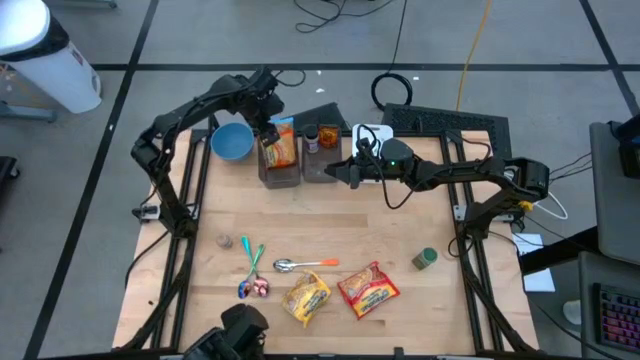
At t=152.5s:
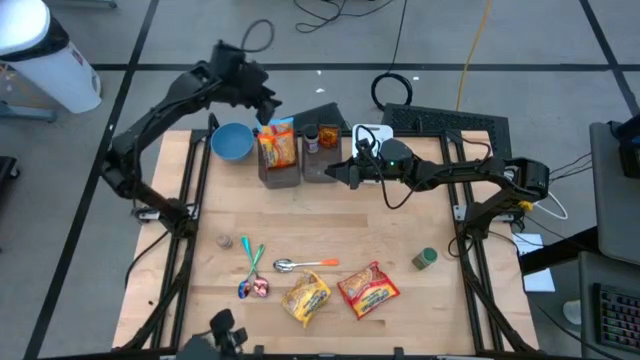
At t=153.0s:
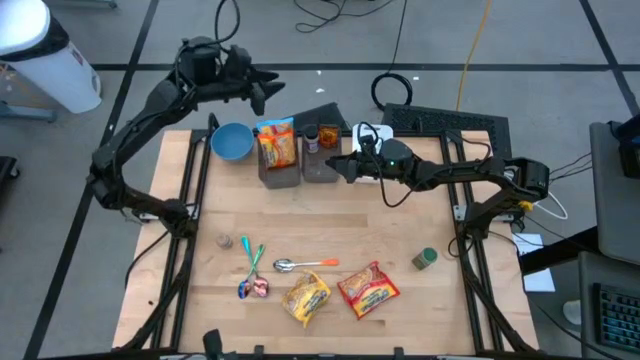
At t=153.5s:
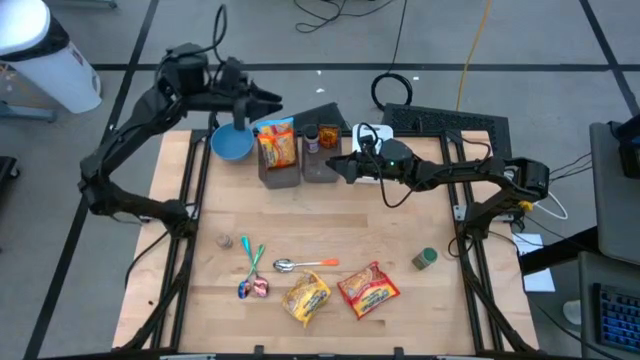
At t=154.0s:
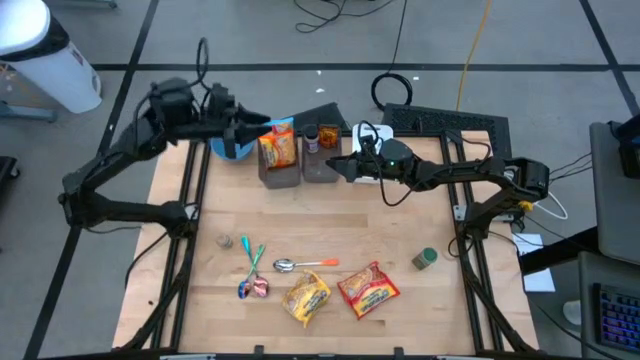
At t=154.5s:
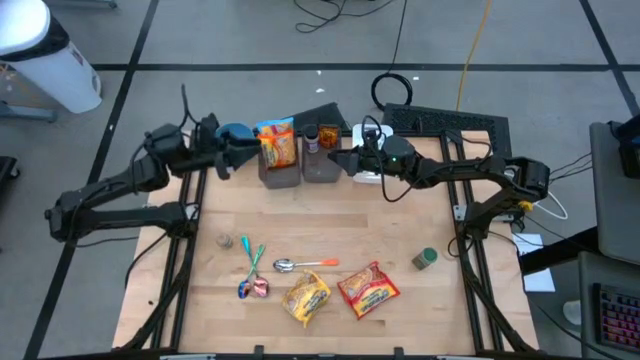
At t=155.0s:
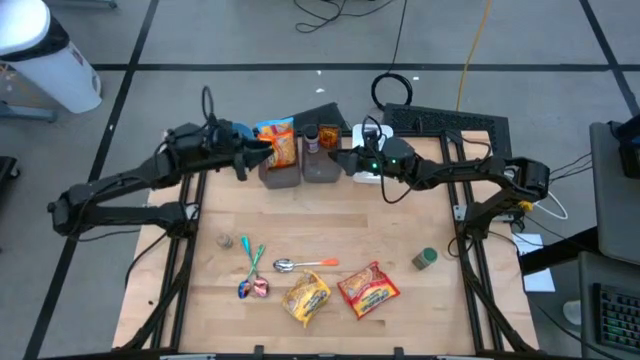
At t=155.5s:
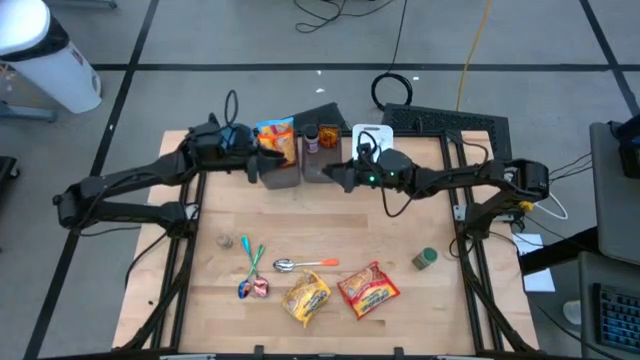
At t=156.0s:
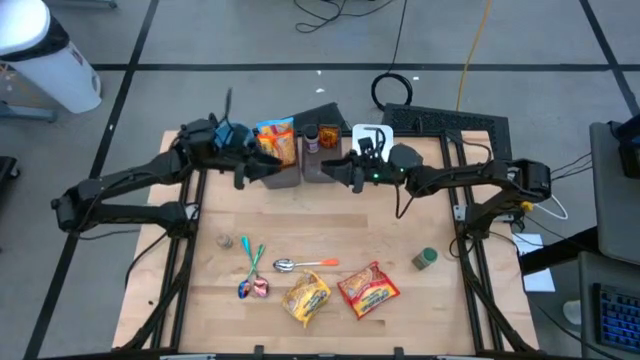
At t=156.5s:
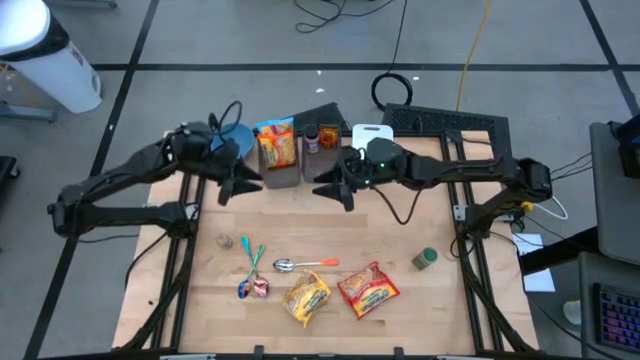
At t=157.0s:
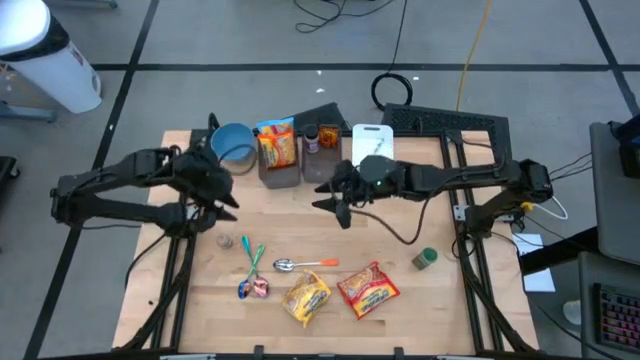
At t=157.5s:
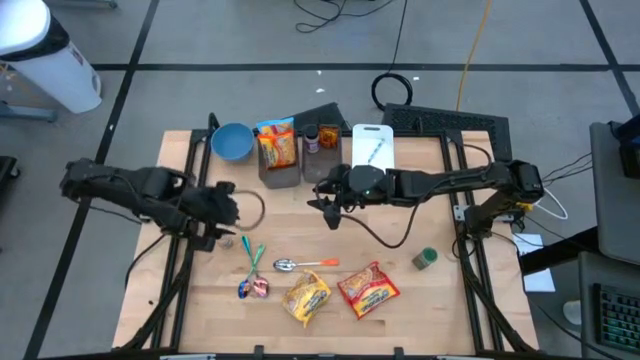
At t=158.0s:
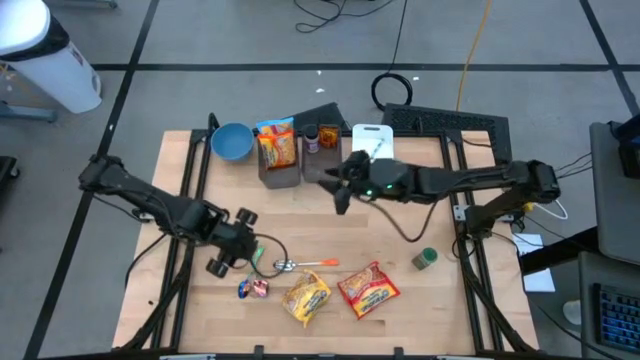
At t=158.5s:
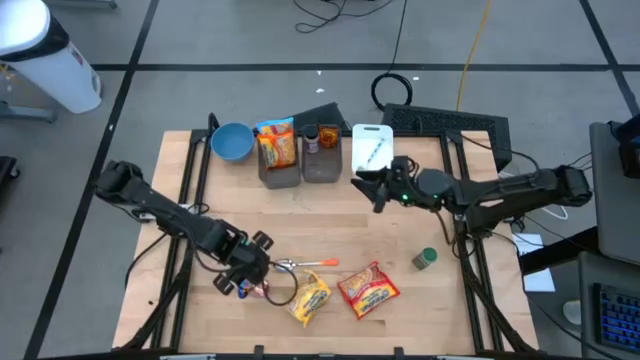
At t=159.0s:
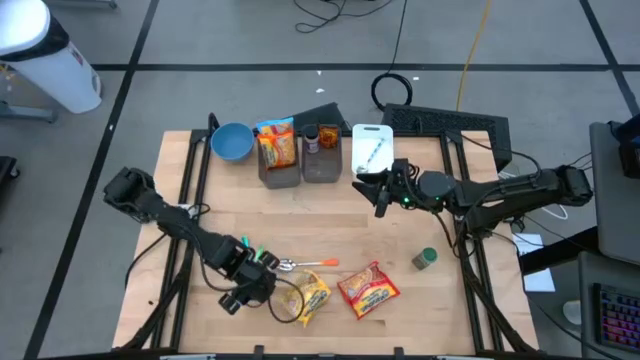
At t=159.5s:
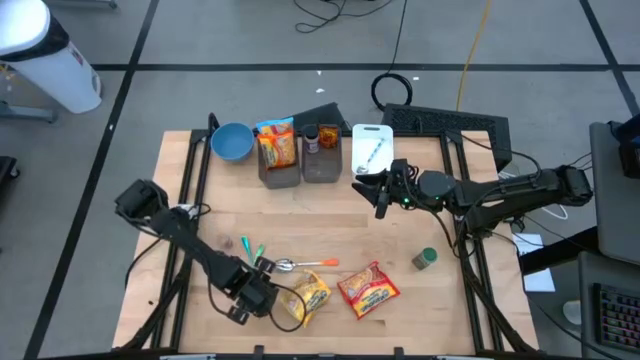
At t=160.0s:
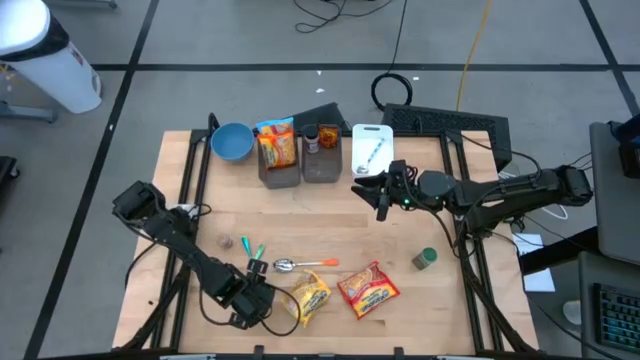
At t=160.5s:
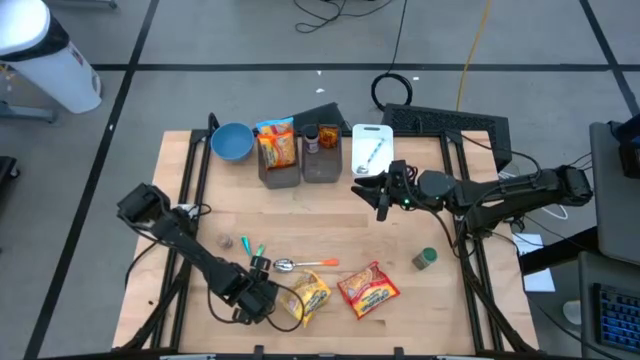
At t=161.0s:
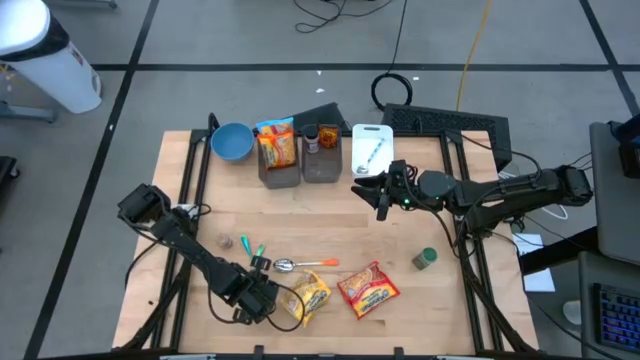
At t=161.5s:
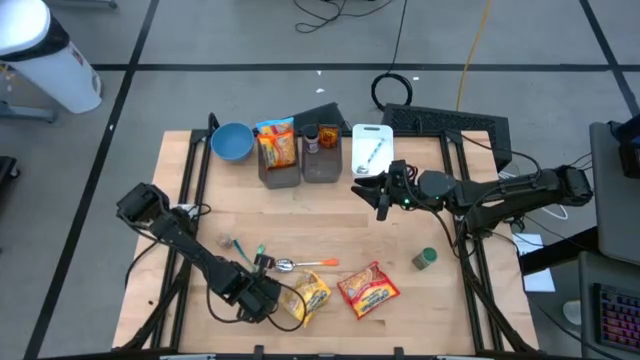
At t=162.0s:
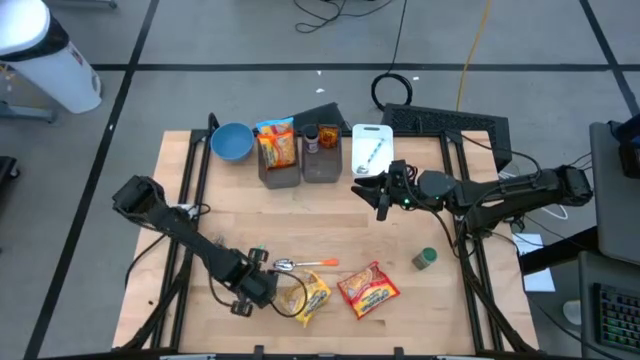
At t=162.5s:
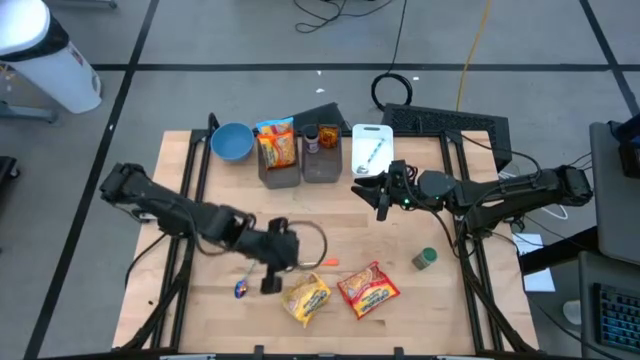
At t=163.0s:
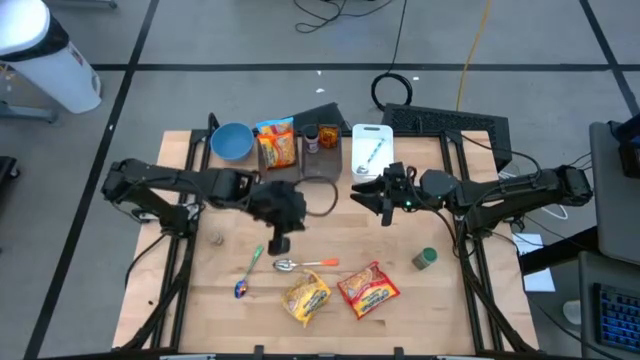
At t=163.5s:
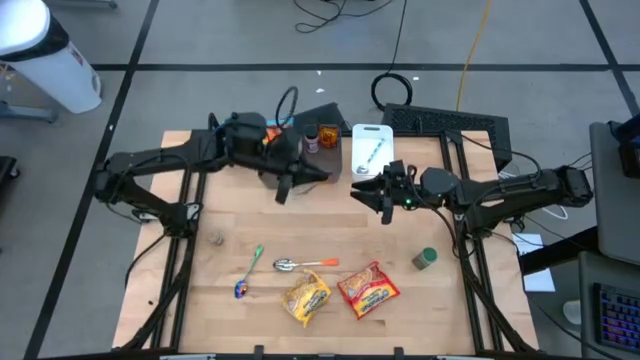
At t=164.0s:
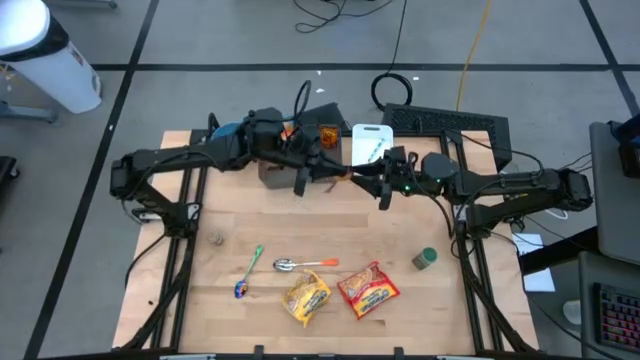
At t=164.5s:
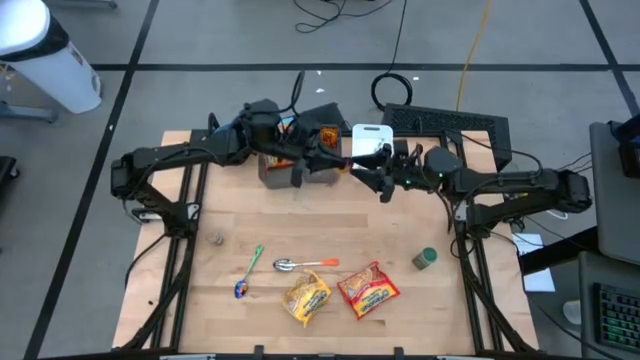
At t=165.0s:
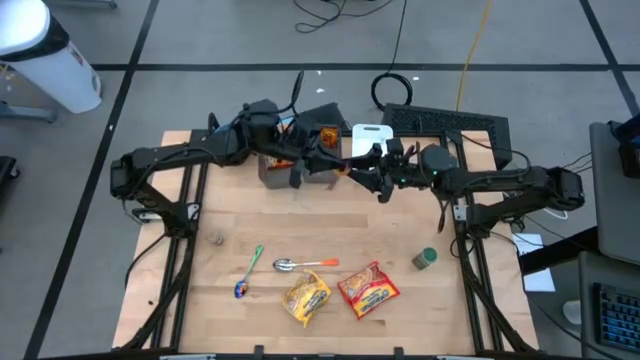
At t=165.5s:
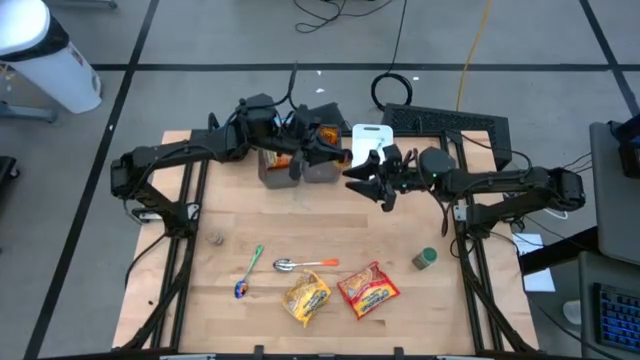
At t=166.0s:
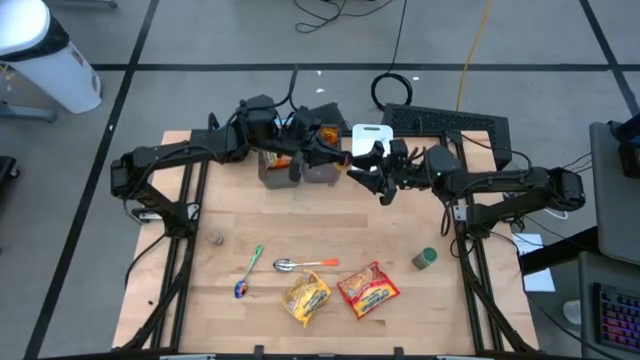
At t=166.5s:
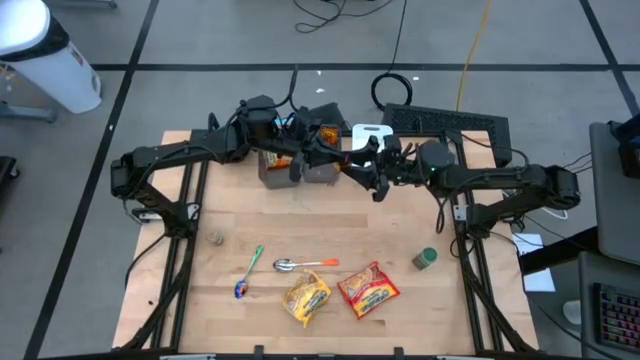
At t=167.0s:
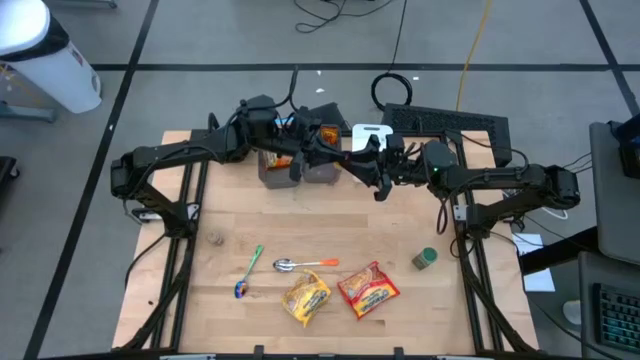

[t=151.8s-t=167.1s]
Task: Pick & Place Food Item
Put the right blue green spoon into the white bin

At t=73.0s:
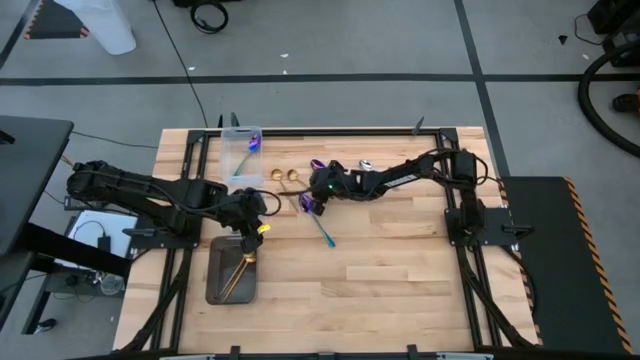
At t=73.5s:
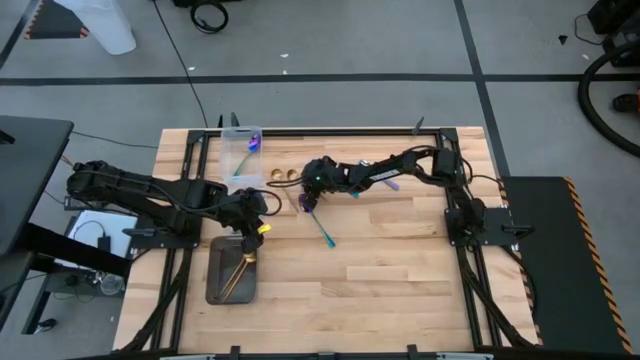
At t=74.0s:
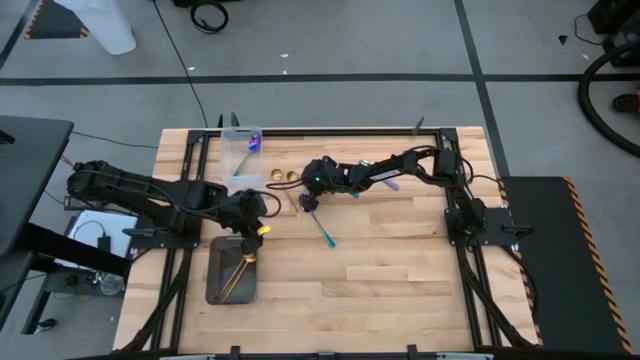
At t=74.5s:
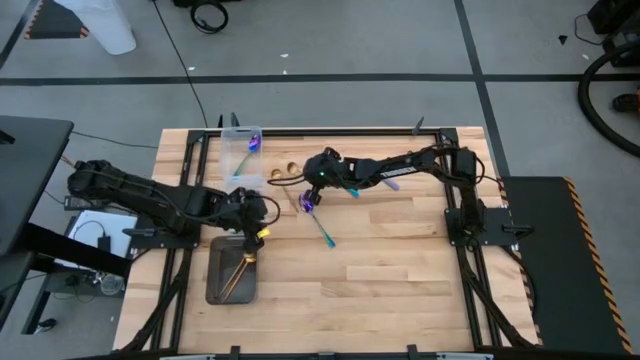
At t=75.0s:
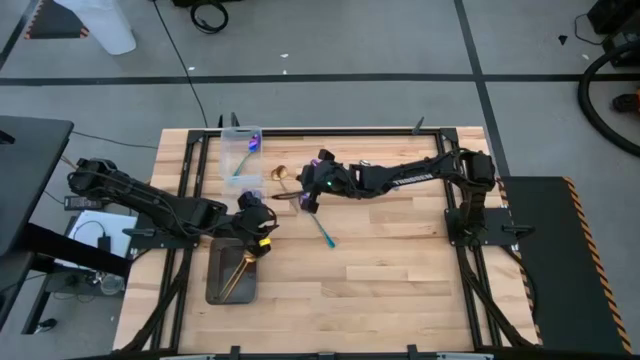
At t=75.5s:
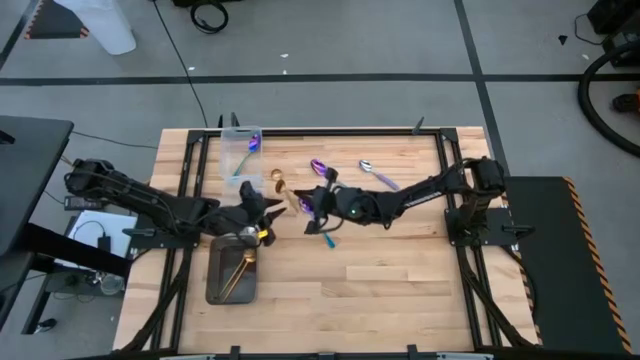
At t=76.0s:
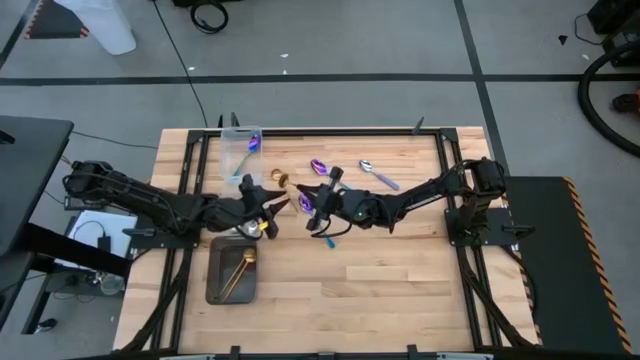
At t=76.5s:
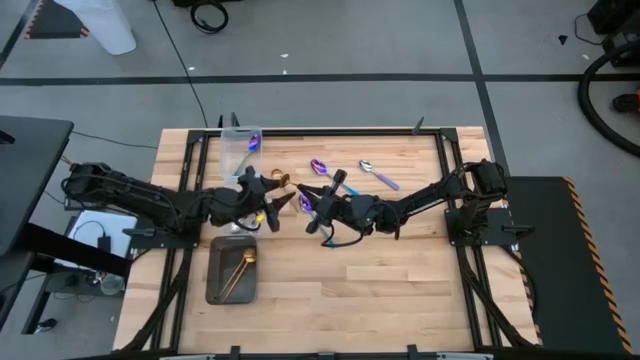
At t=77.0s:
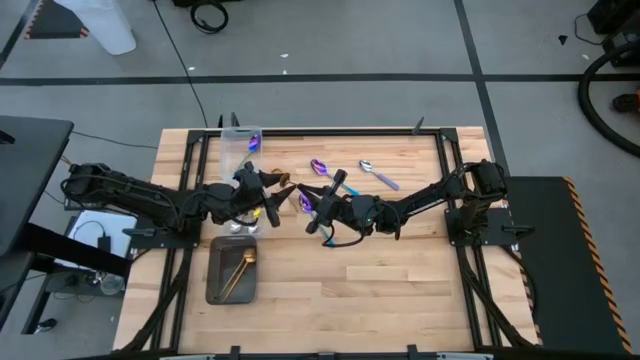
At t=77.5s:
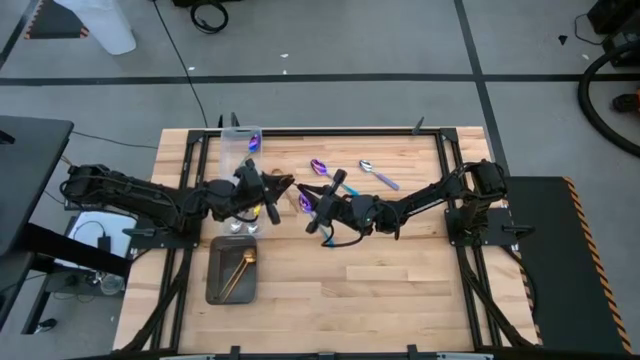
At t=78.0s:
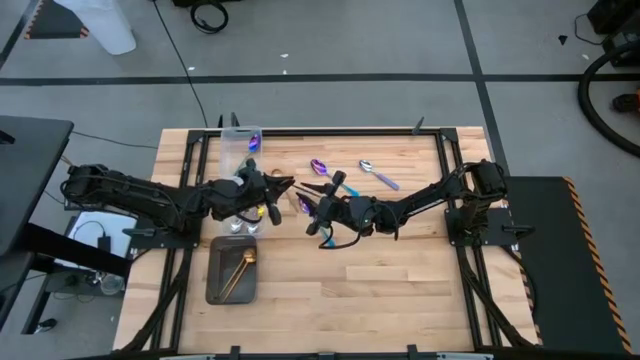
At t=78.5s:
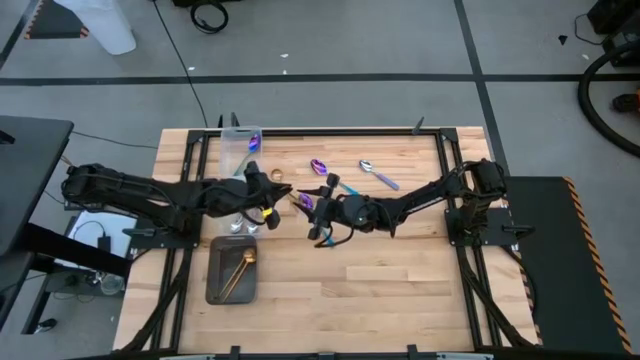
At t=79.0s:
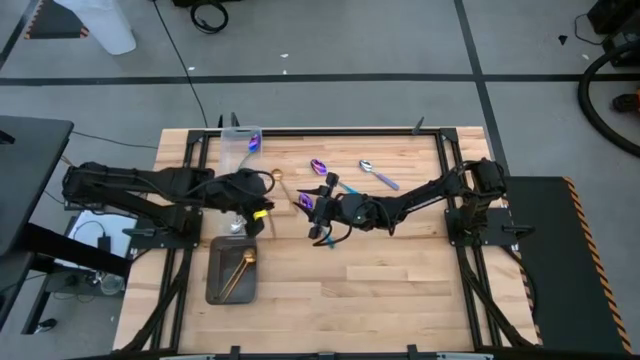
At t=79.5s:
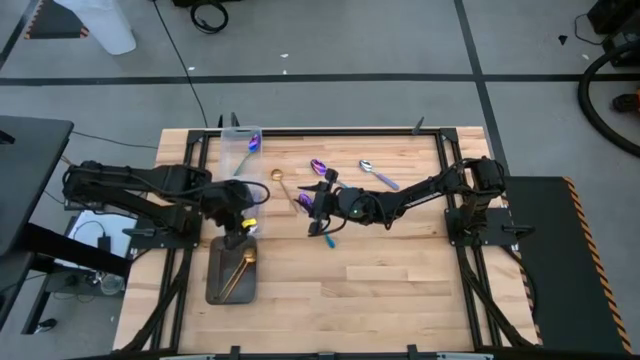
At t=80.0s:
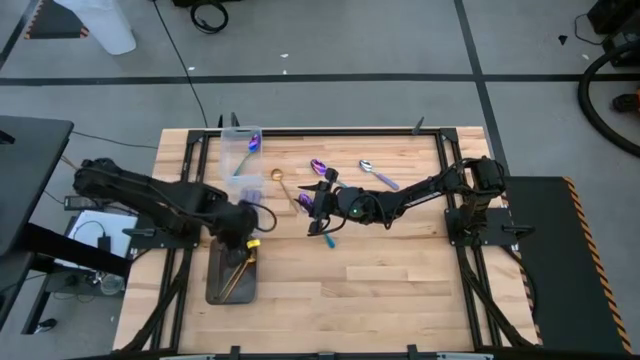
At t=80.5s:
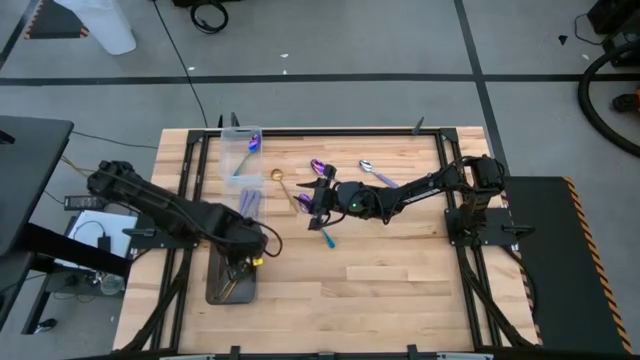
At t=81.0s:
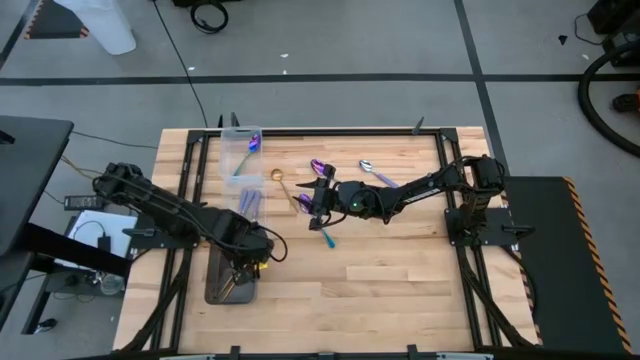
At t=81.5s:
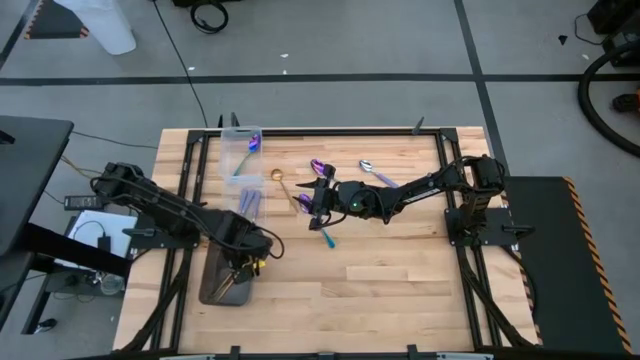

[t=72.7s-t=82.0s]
Task: Sort silverware by color (type)
Put the gold spoon into the black bin
